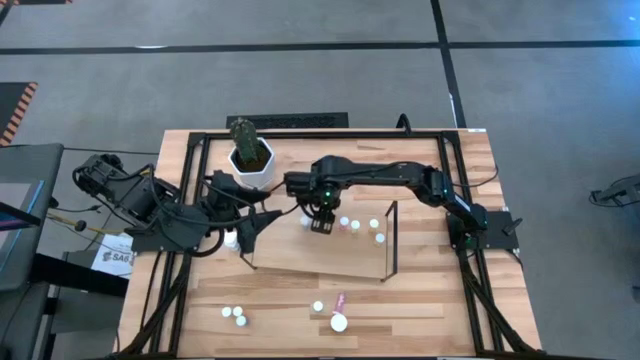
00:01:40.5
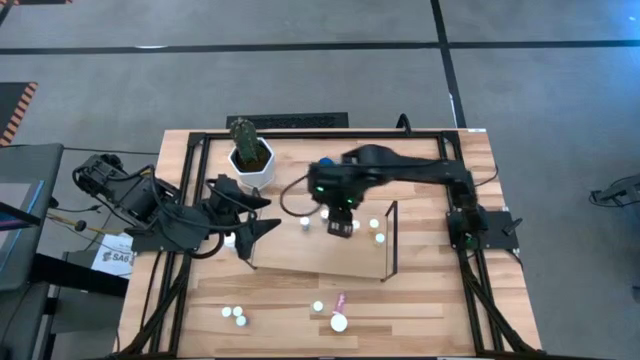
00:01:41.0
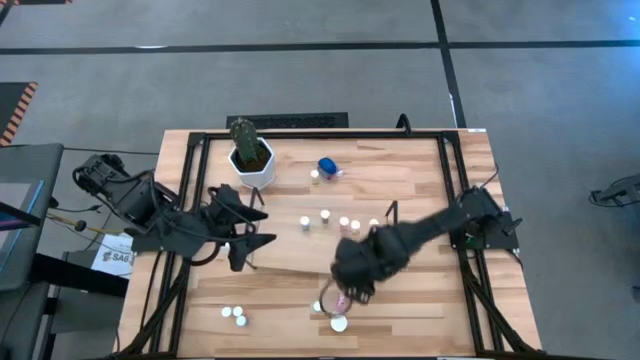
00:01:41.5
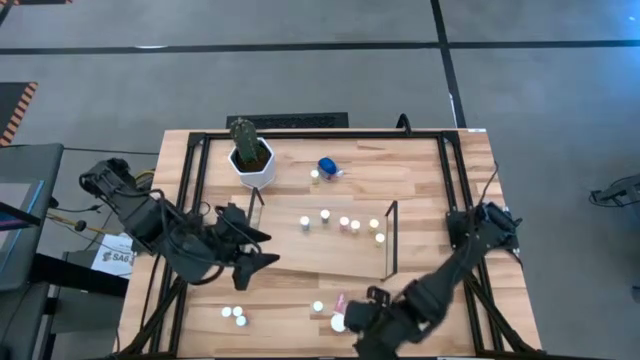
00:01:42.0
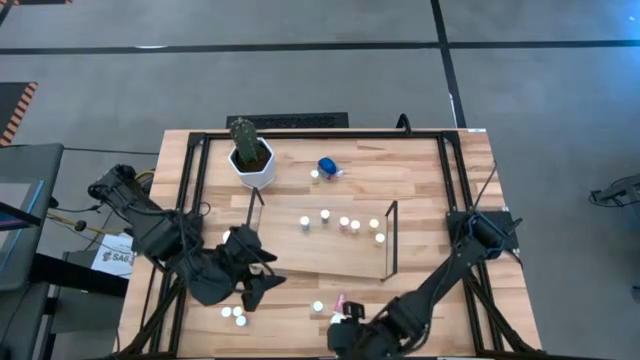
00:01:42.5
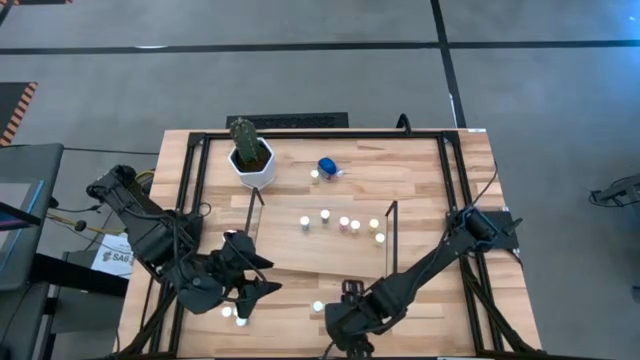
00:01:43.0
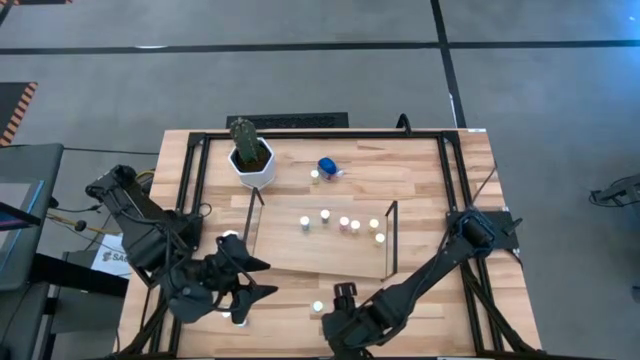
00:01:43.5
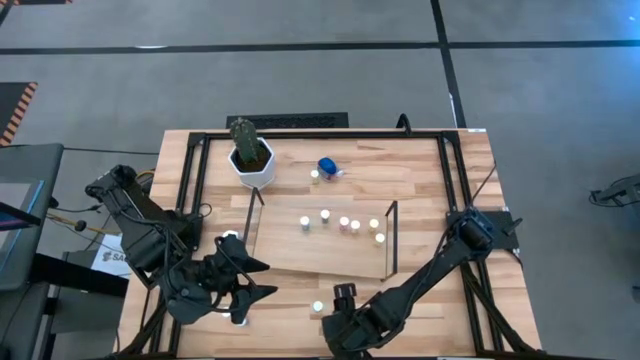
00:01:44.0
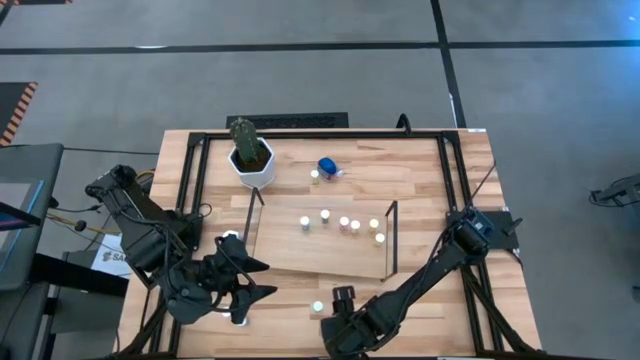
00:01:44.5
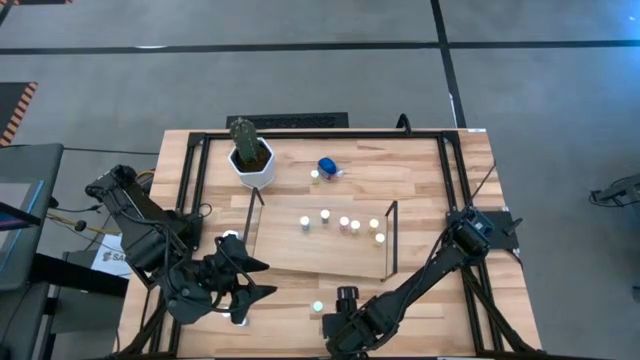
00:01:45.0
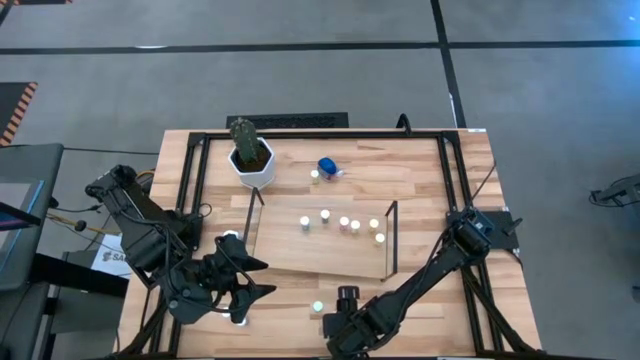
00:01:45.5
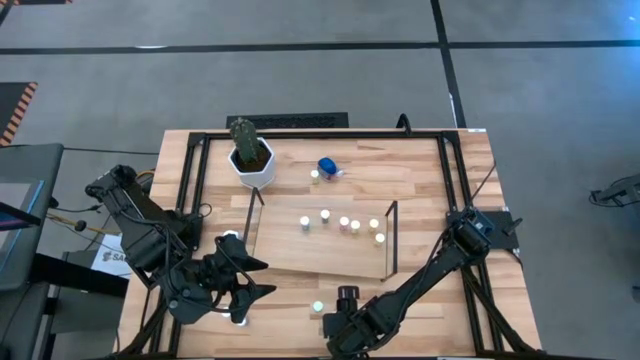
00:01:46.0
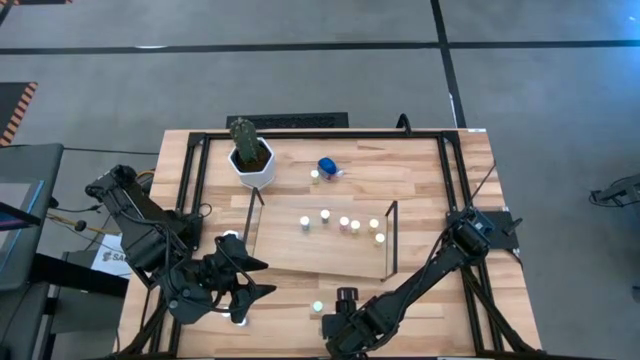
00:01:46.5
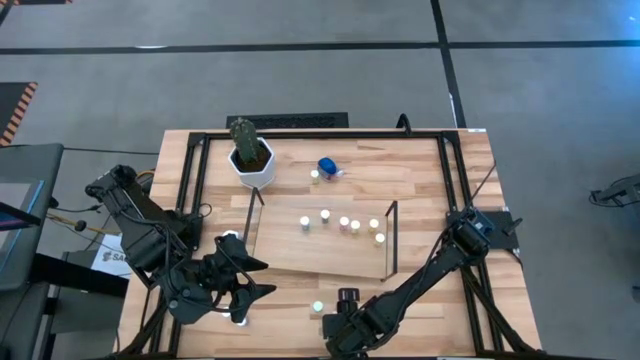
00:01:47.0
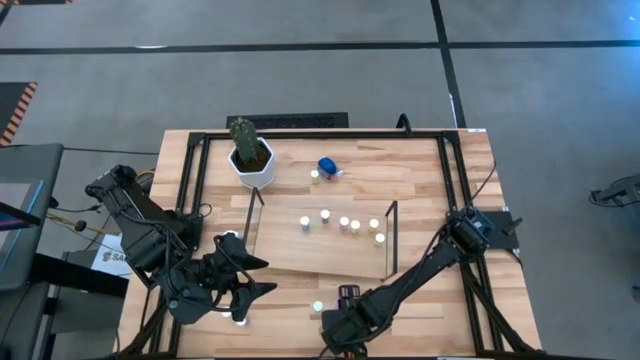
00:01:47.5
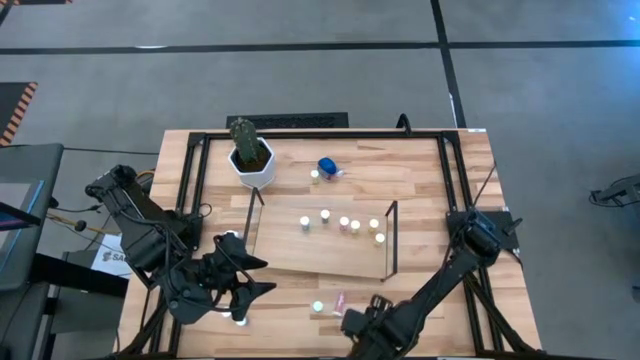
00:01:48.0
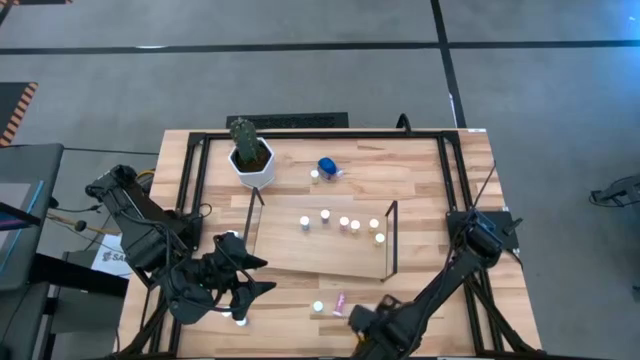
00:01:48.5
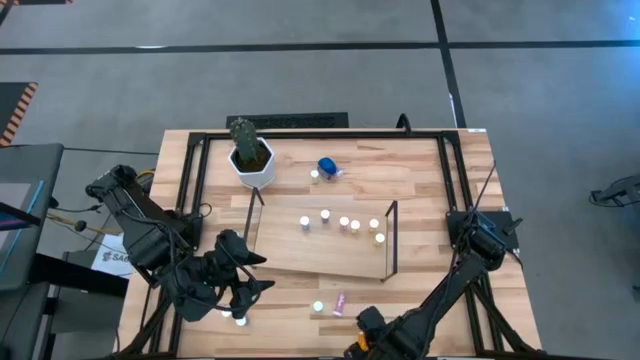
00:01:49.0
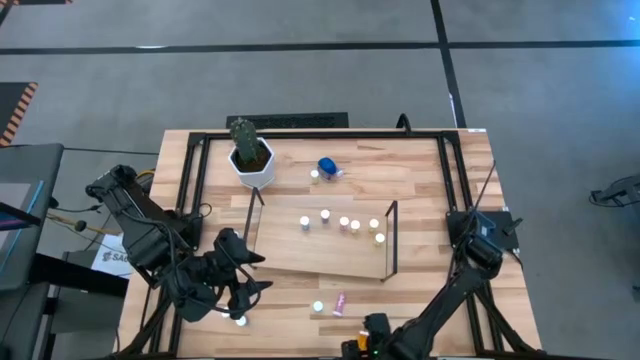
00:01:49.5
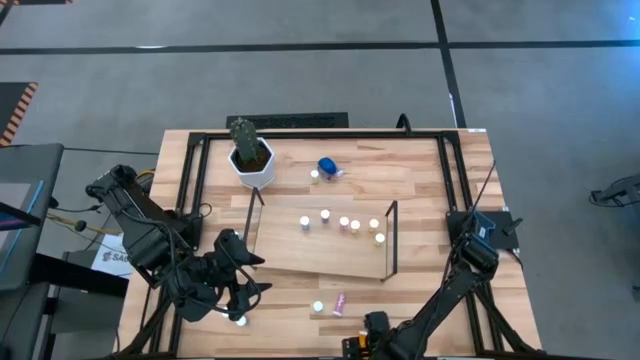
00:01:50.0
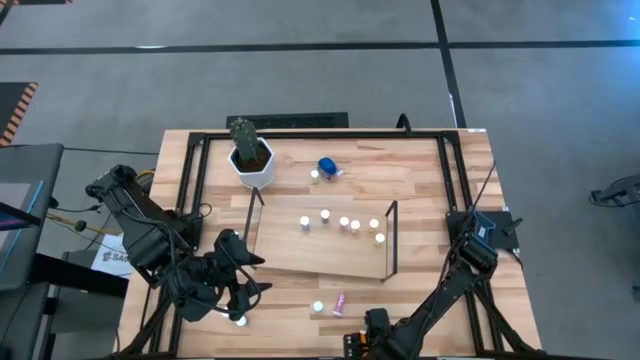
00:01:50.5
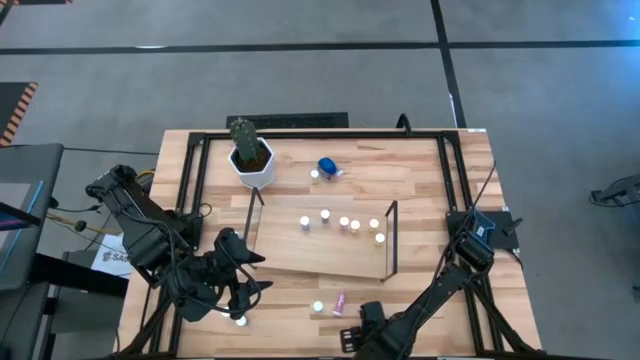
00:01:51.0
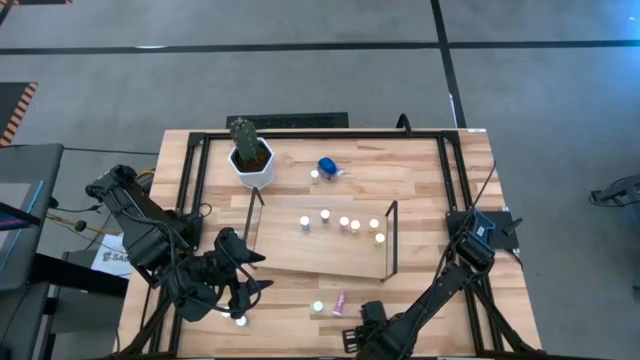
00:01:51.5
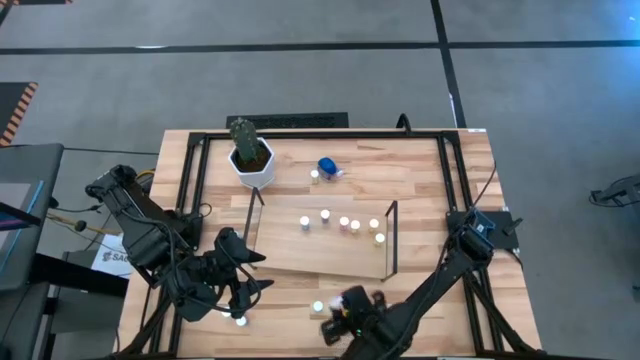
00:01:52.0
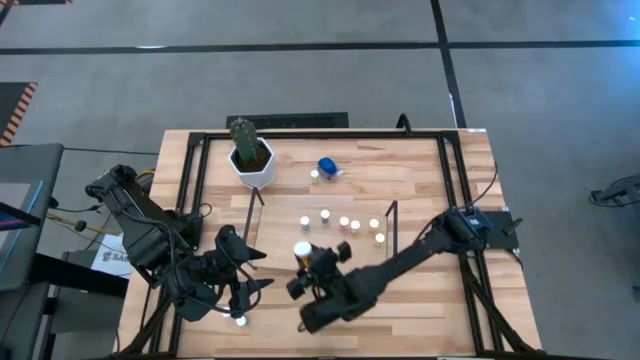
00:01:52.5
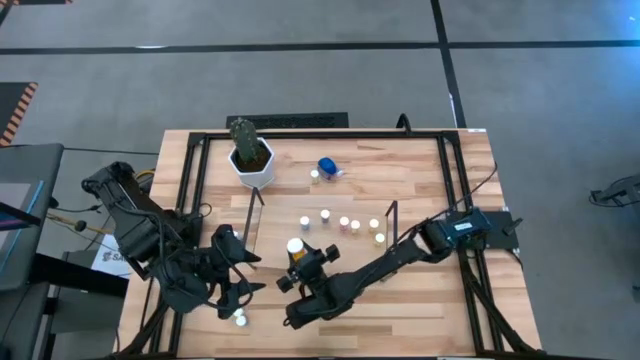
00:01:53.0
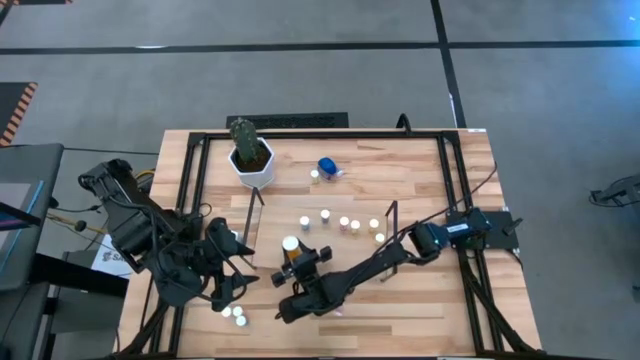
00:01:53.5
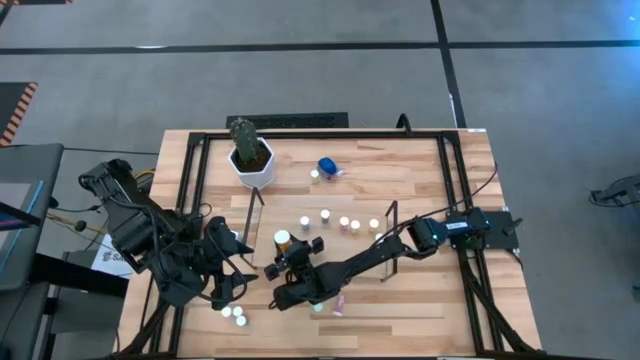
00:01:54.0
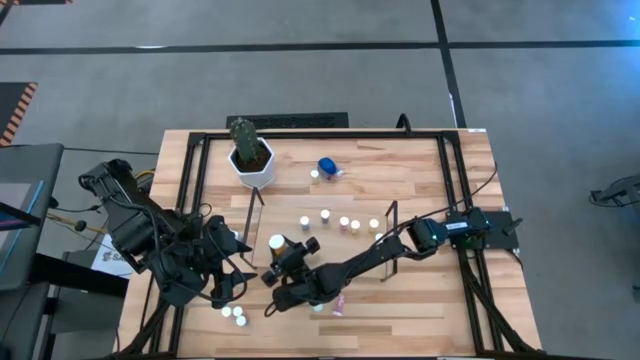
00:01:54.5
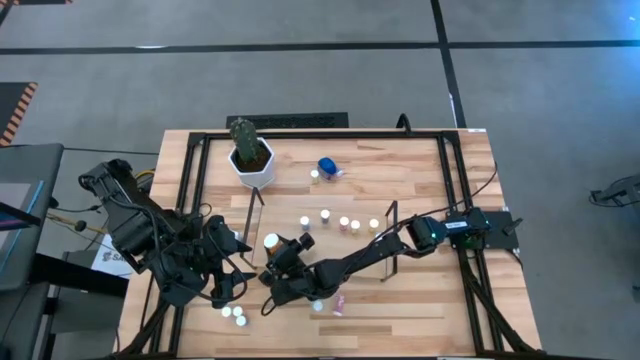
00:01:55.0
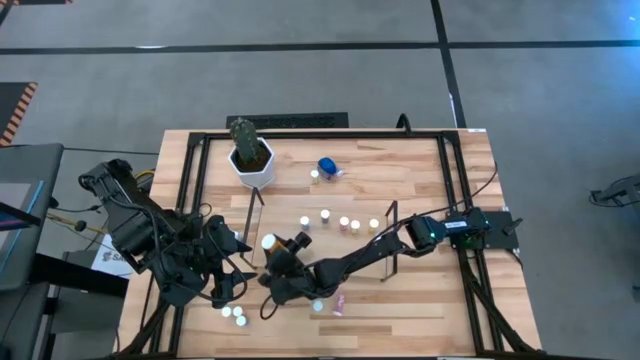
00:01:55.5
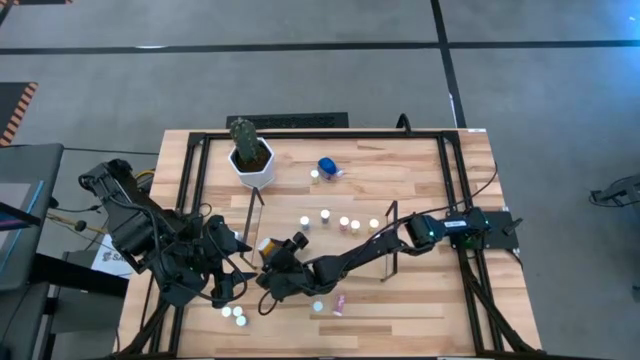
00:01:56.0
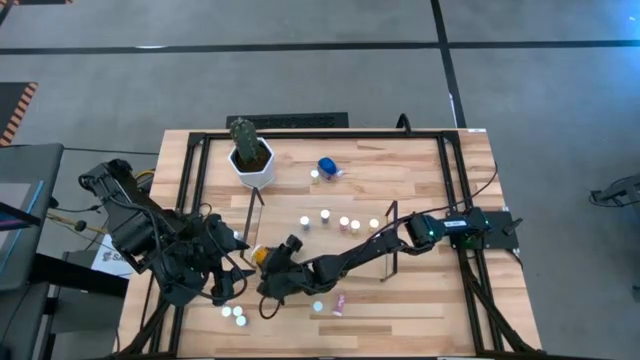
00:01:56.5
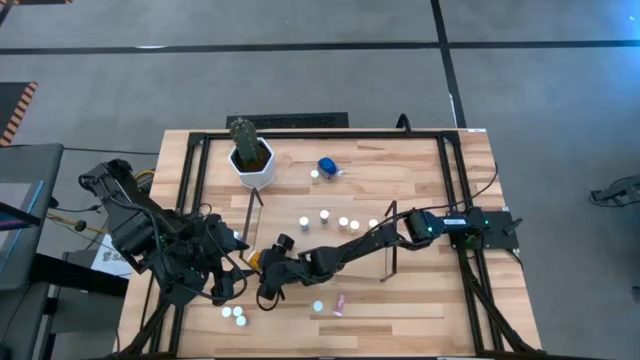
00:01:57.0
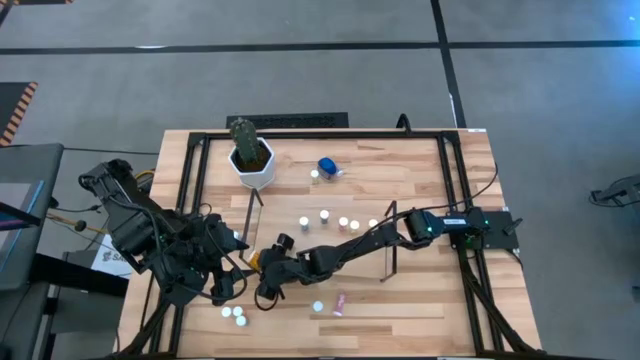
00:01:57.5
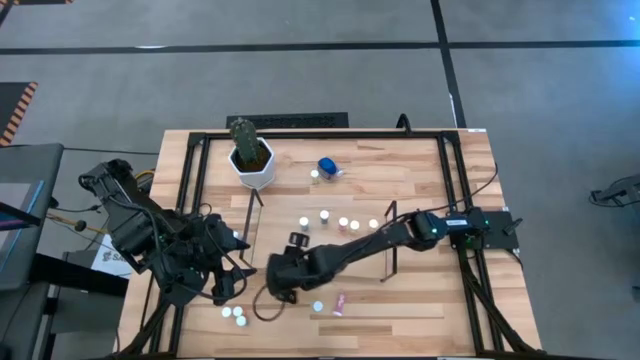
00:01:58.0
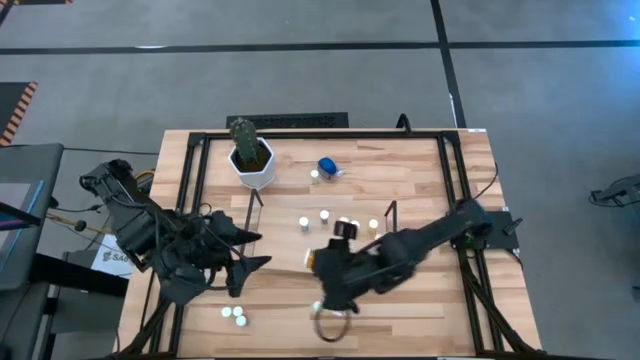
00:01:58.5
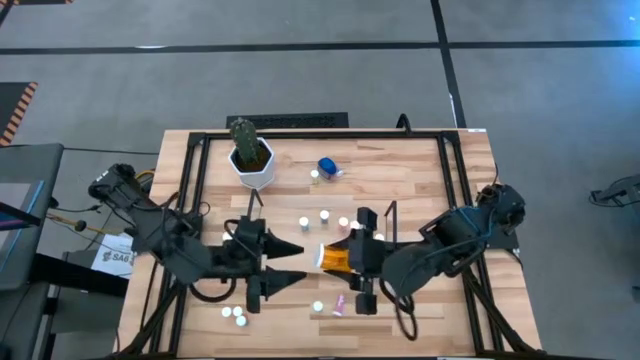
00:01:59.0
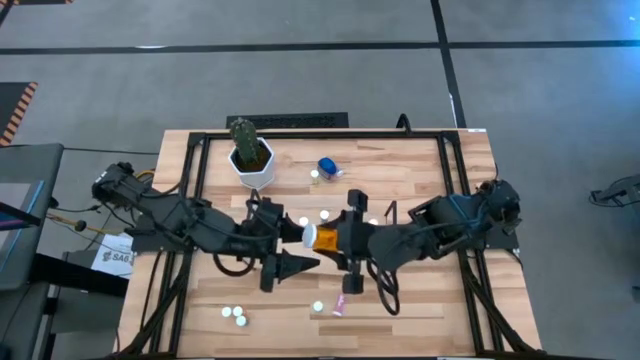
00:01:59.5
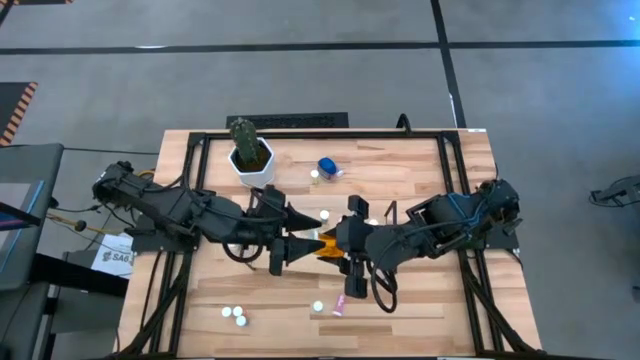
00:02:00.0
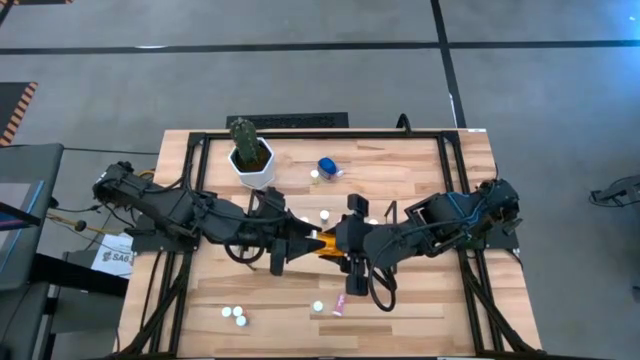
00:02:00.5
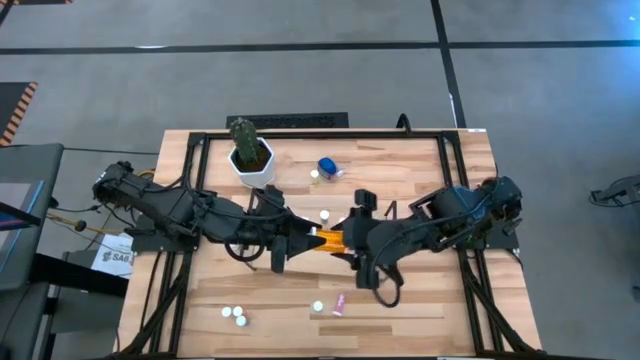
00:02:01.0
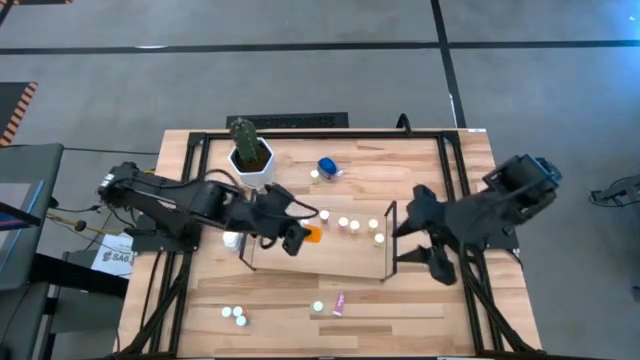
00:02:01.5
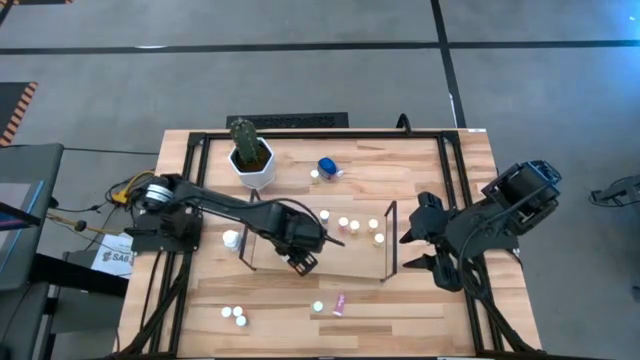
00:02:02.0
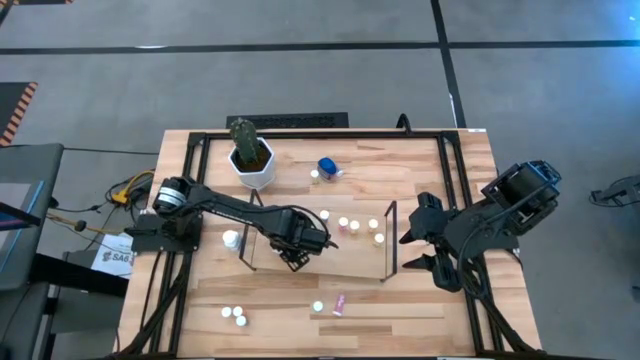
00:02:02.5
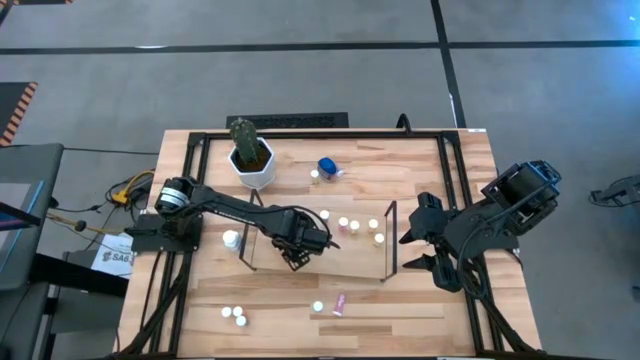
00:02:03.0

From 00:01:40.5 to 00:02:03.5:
Task: Pick and place medicine bottles onto shelf by color
Put the large orange pill bottle on the shelf
